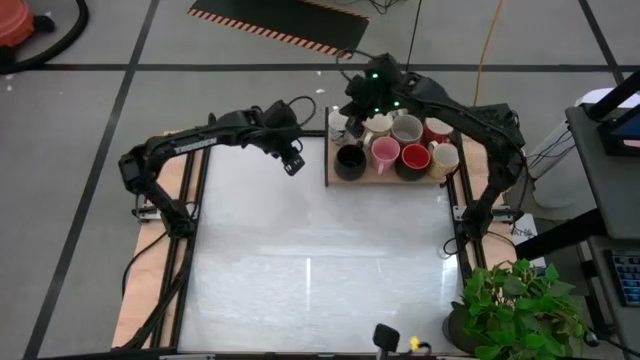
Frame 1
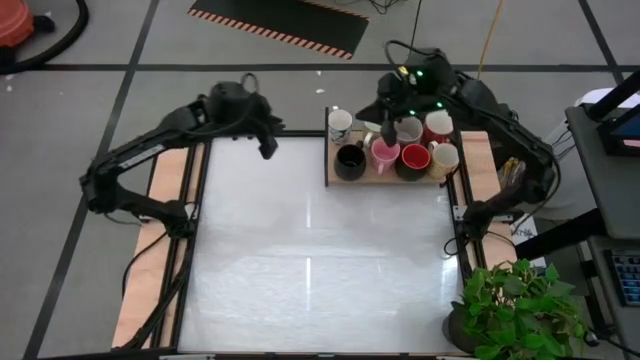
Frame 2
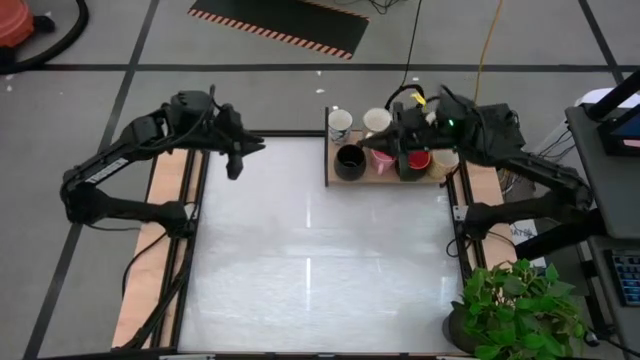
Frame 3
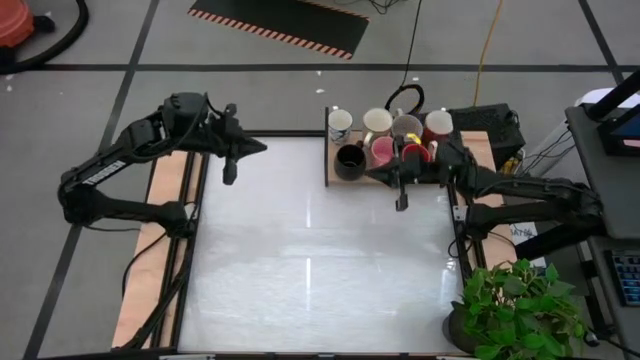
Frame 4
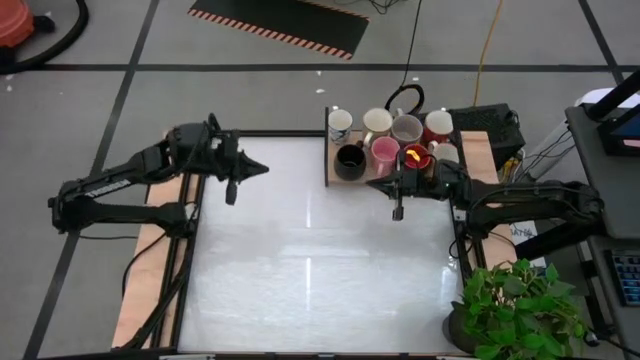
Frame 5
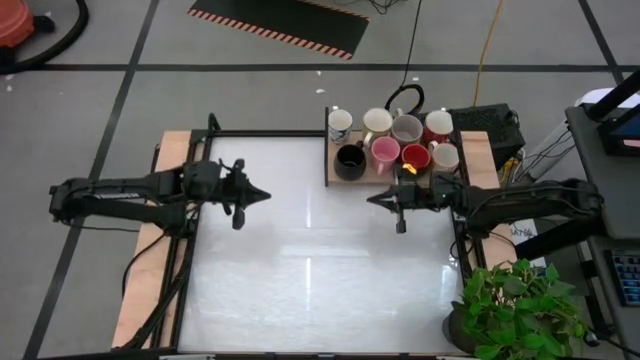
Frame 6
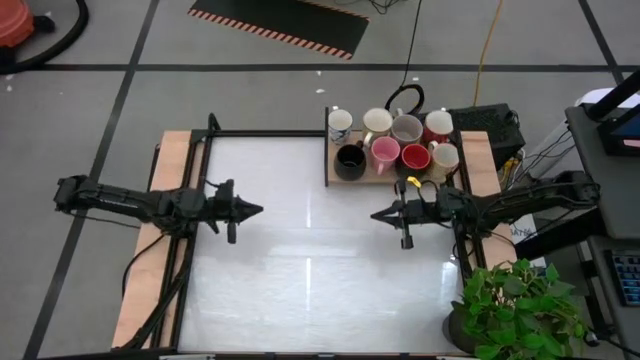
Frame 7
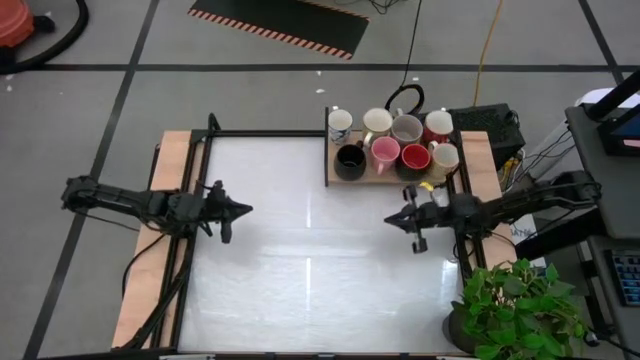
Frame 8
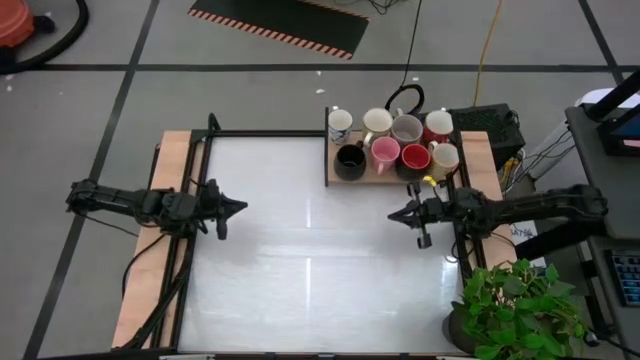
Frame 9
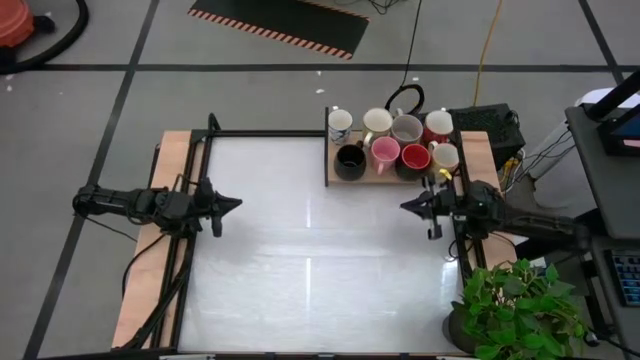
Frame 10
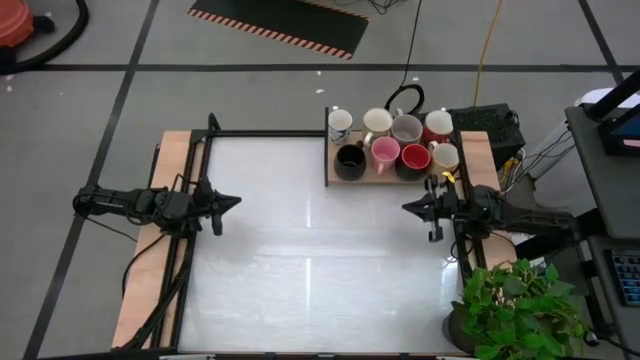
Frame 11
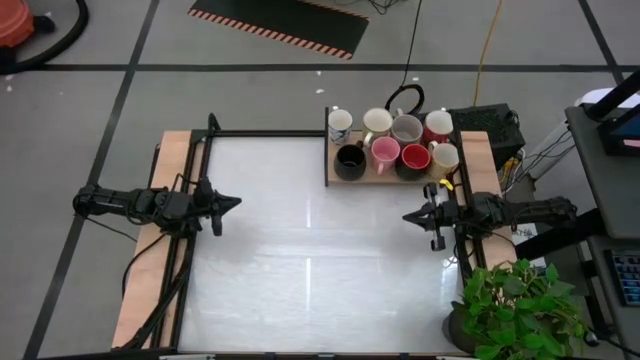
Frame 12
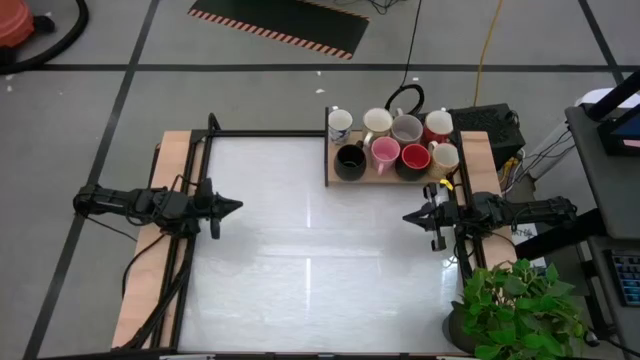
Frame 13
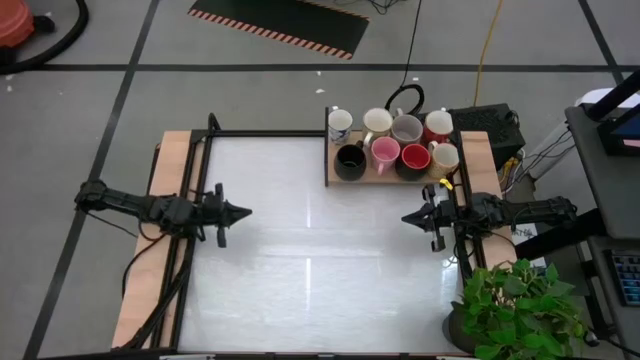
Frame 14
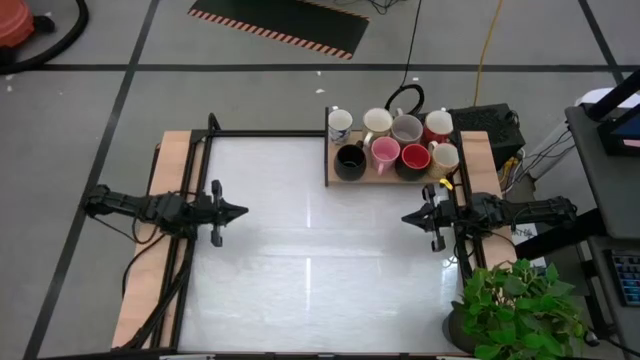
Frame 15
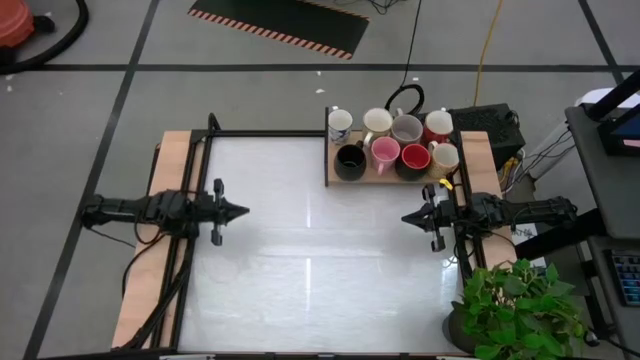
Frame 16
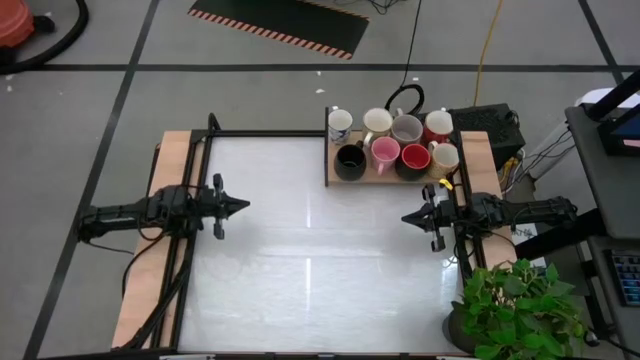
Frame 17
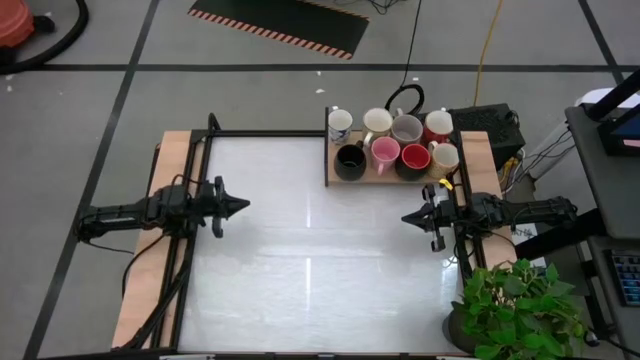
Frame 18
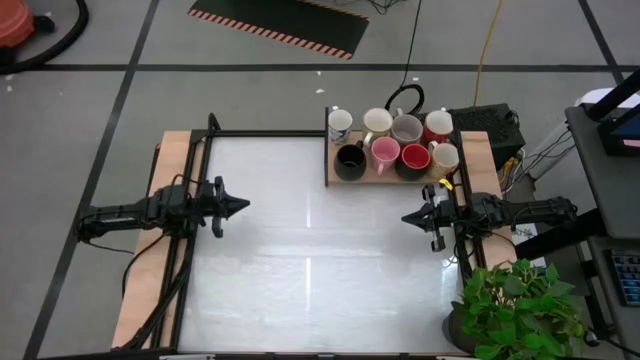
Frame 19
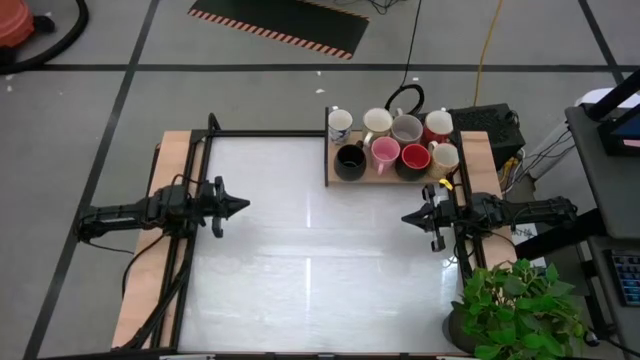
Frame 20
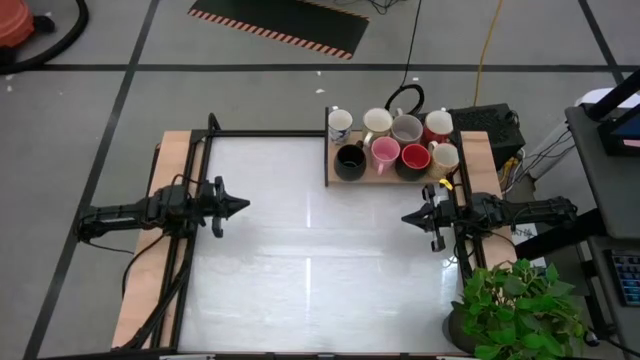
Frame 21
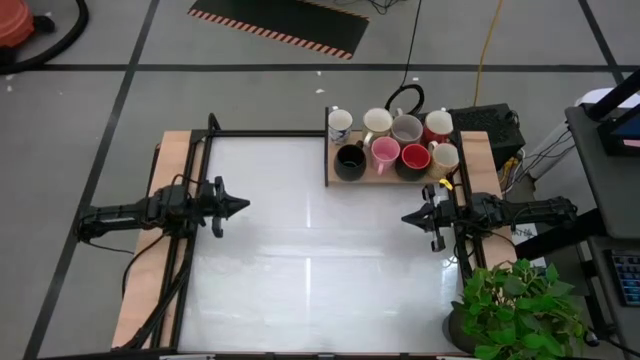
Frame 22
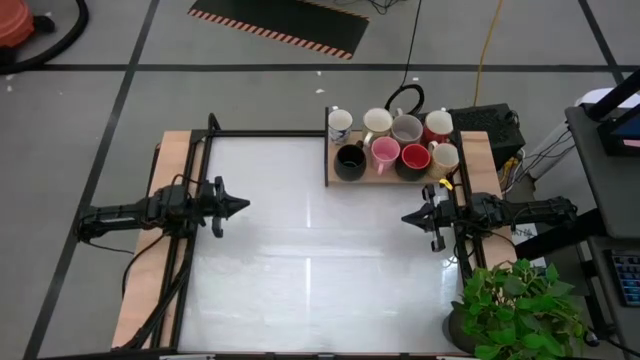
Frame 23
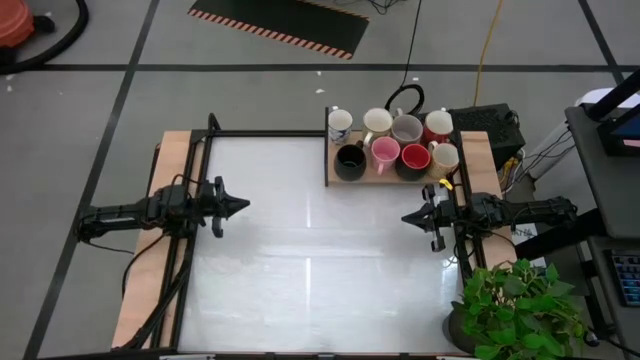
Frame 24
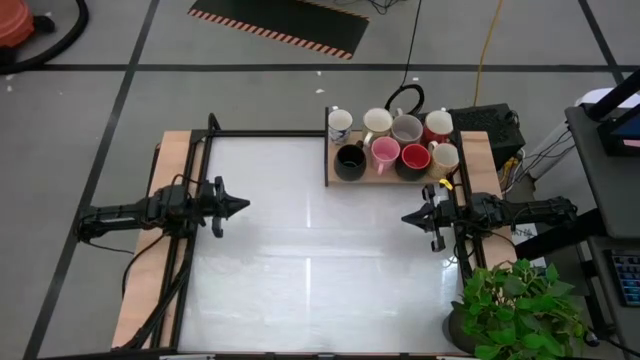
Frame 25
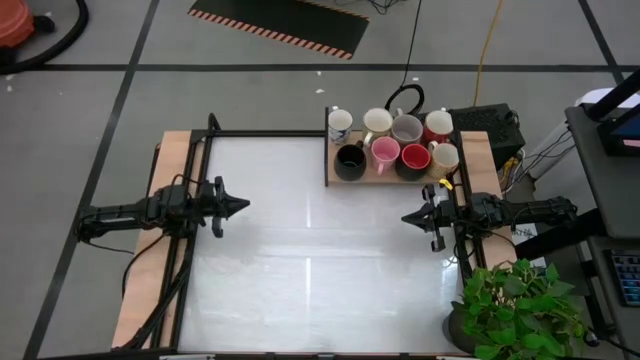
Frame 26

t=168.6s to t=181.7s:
Task: Place coffee mugs
Return to Home Position

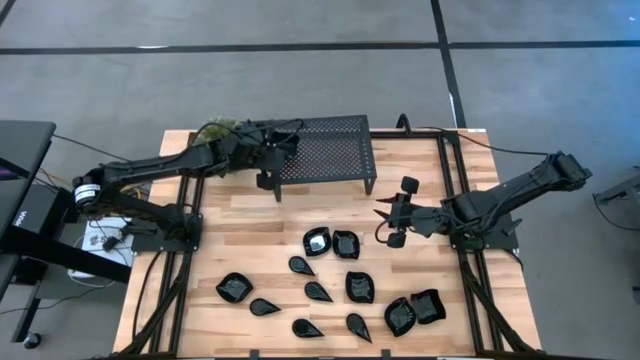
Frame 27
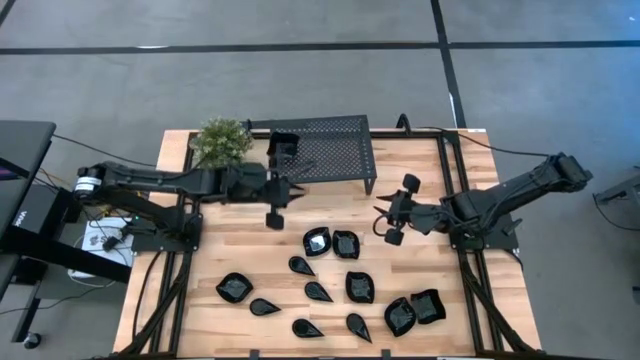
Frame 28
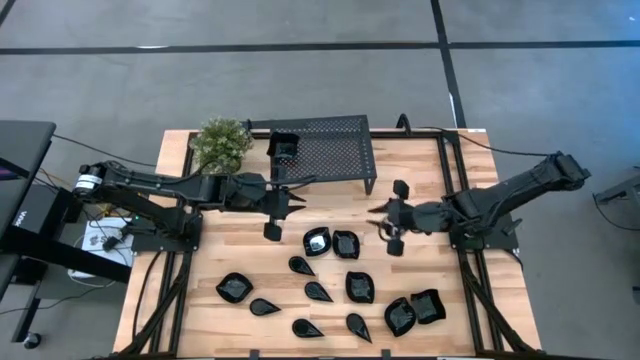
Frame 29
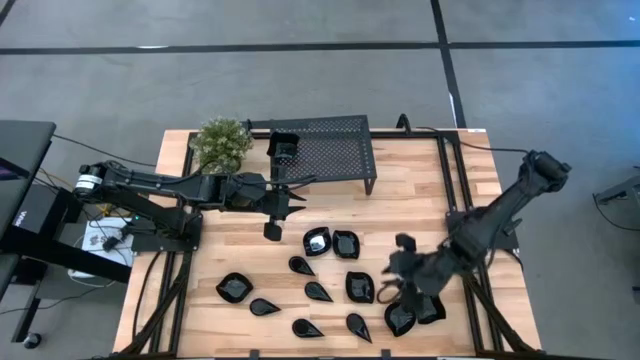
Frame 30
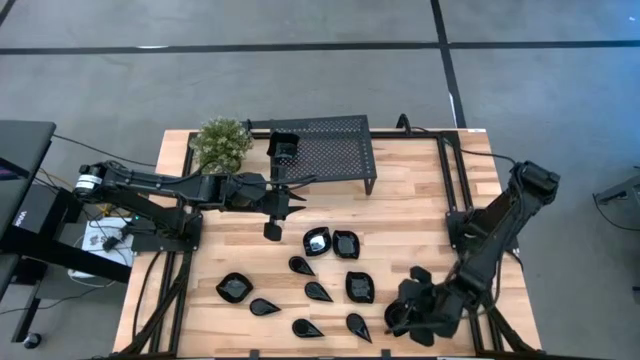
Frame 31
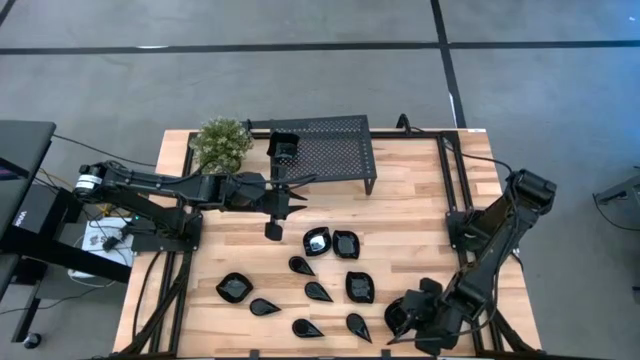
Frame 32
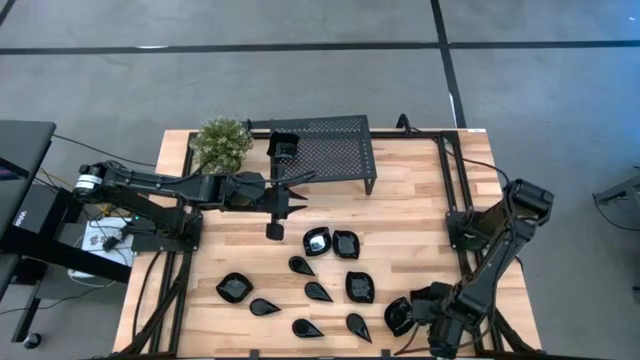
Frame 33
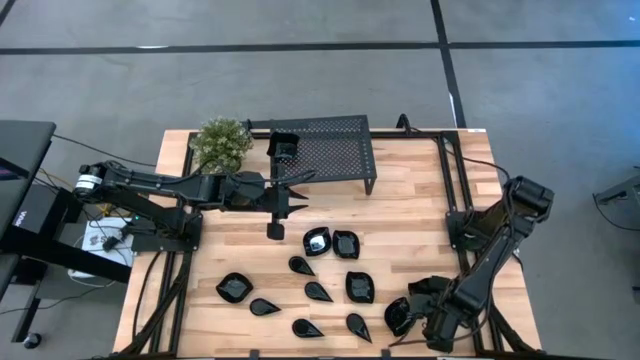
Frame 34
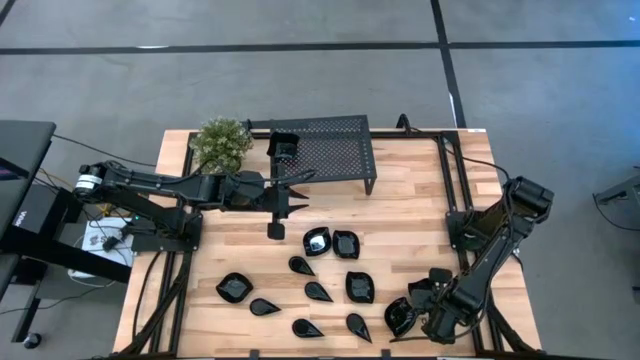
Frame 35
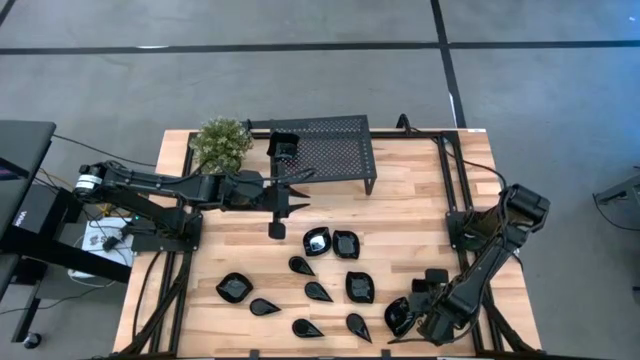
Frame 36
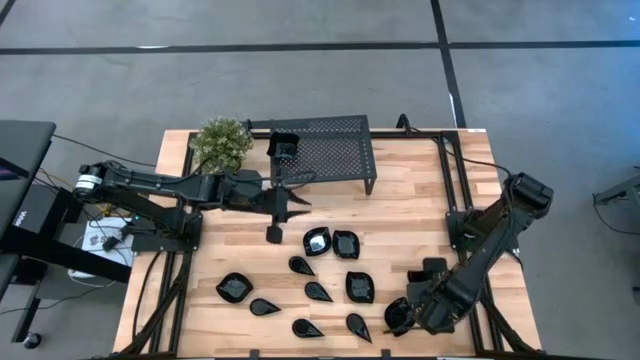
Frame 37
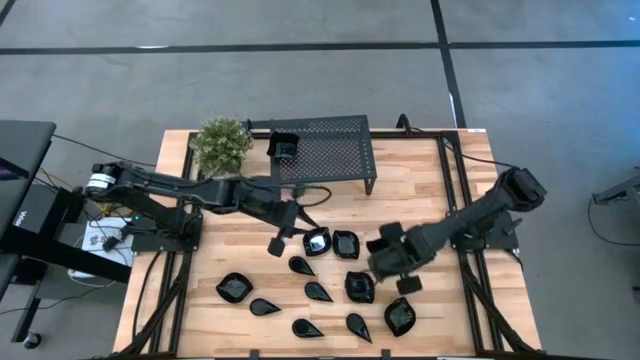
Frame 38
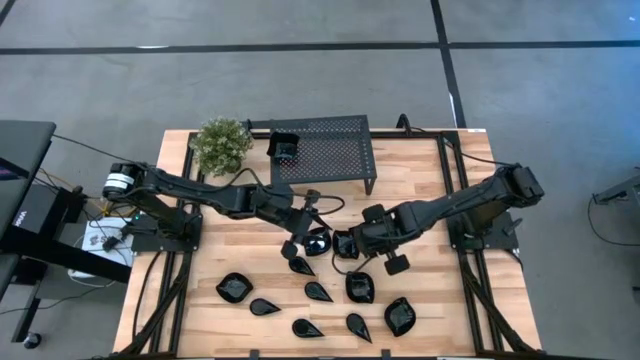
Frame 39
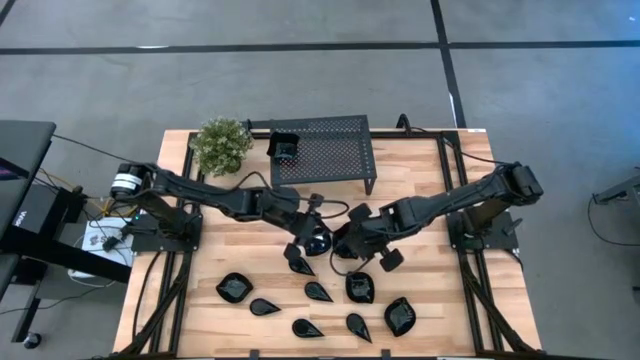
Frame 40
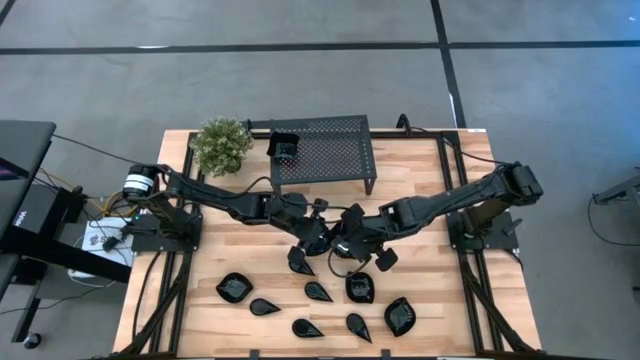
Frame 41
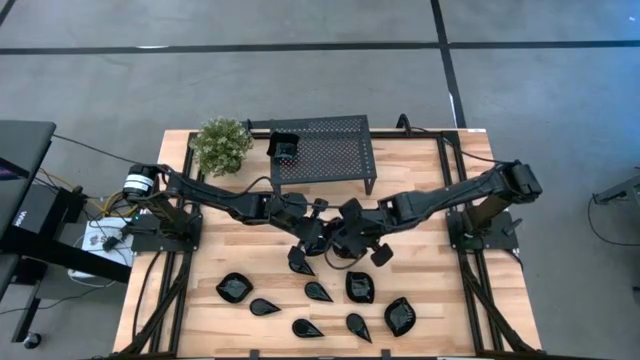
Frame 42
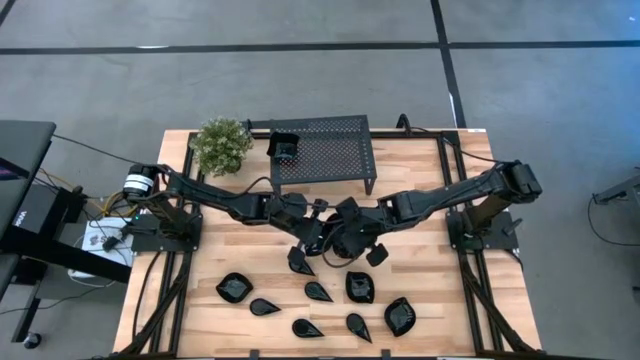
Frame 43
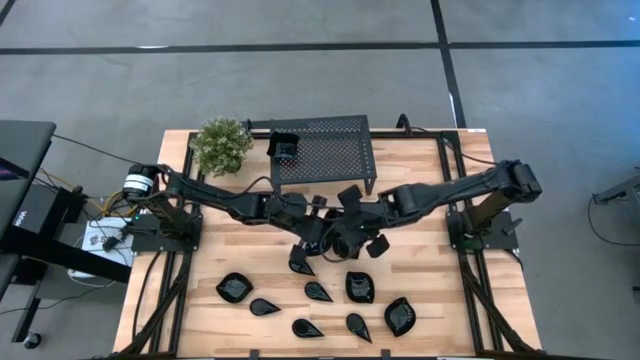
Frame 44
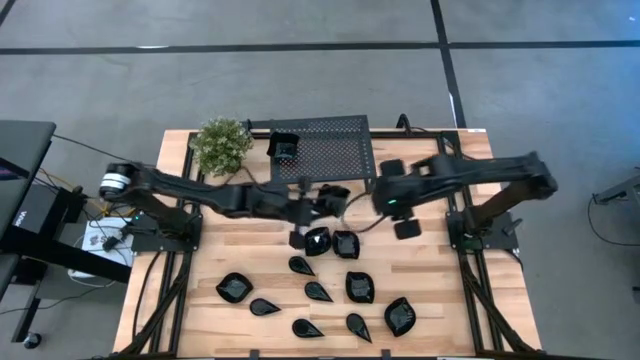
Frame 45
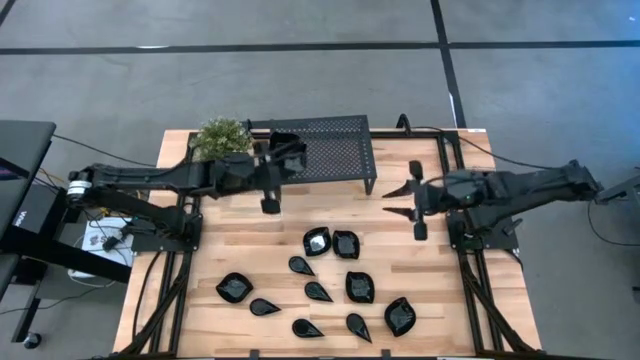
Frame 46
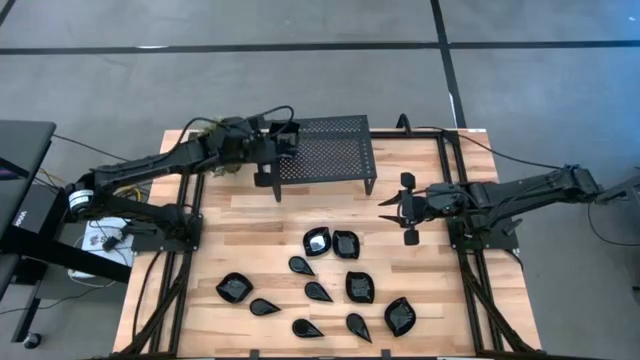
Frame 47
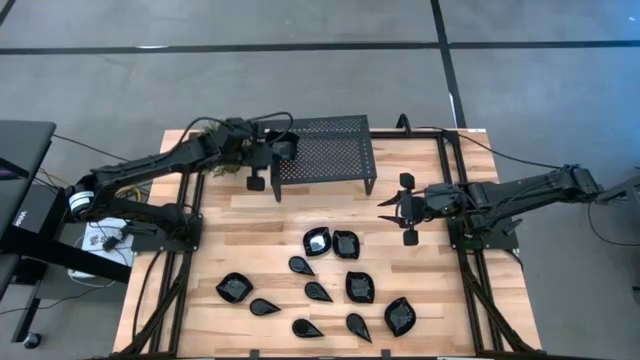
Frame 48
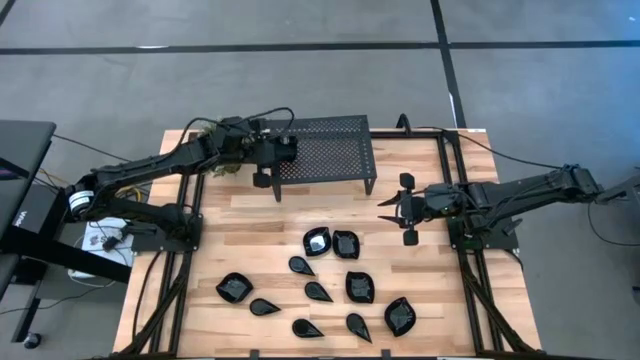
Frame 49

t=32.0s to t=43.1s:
Task: Pick & Place Mini shaped plates
Stack the distorted square plate on top of the distorted square plates on the shelf
